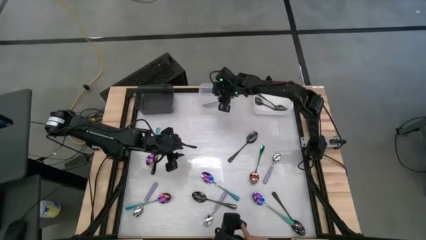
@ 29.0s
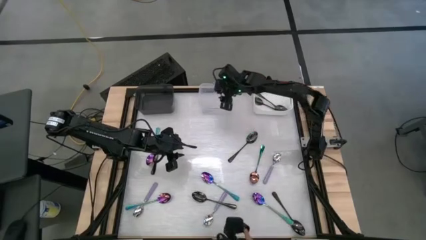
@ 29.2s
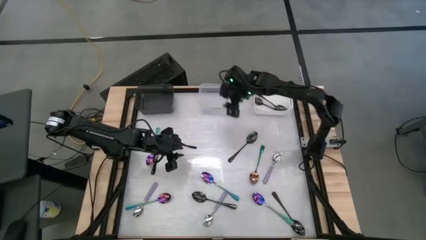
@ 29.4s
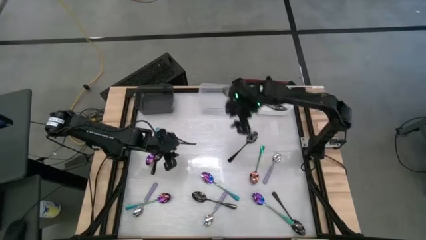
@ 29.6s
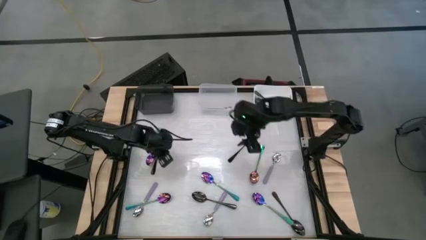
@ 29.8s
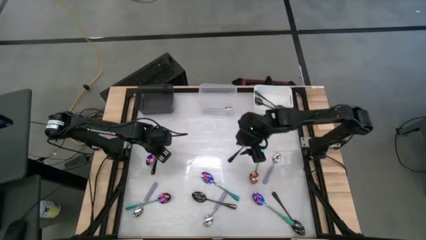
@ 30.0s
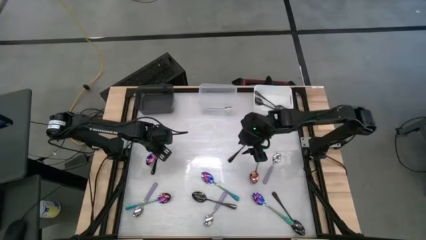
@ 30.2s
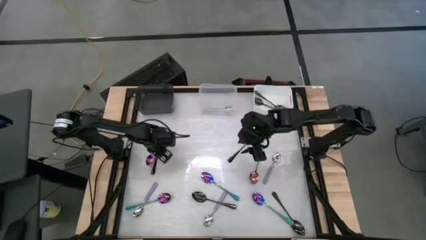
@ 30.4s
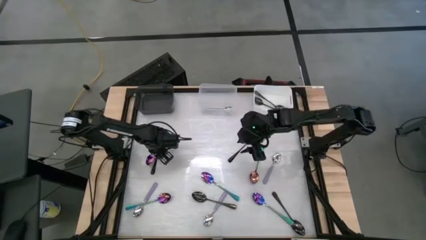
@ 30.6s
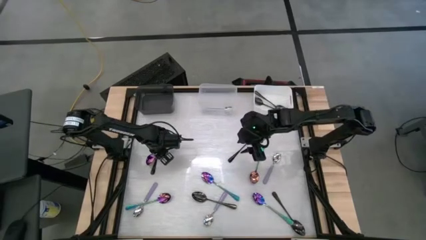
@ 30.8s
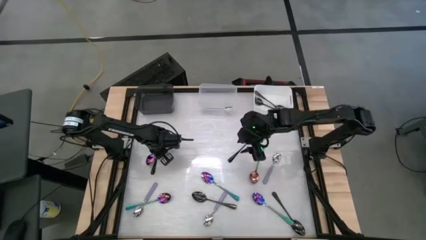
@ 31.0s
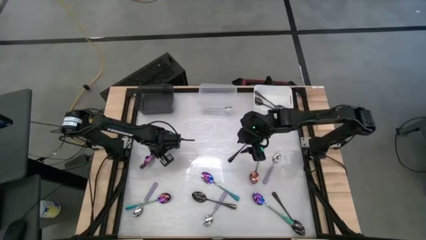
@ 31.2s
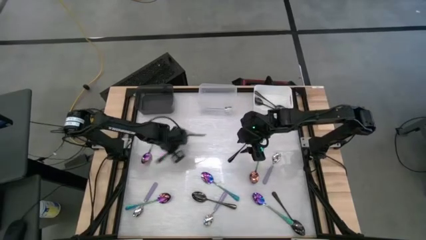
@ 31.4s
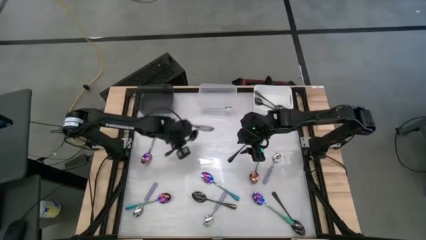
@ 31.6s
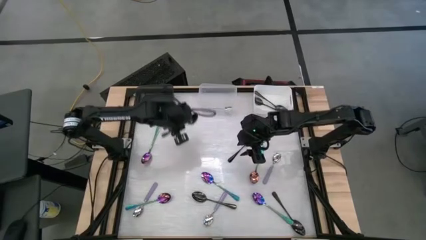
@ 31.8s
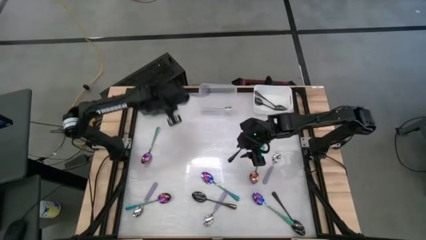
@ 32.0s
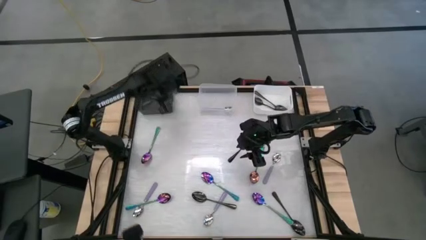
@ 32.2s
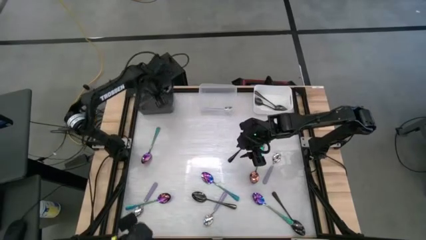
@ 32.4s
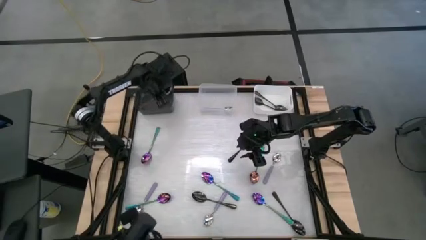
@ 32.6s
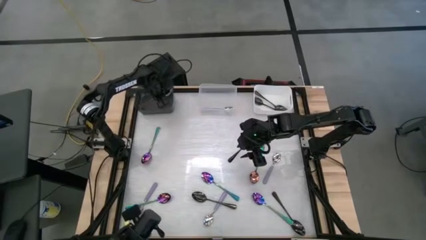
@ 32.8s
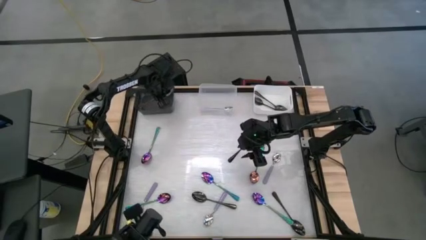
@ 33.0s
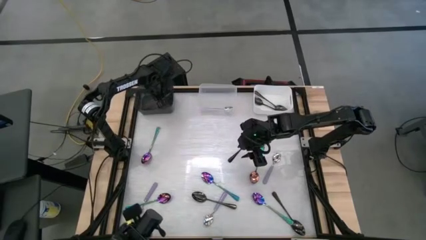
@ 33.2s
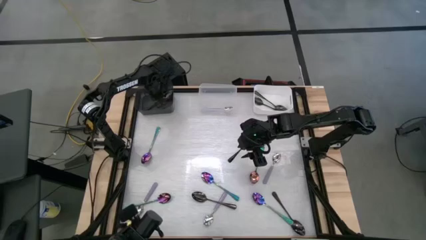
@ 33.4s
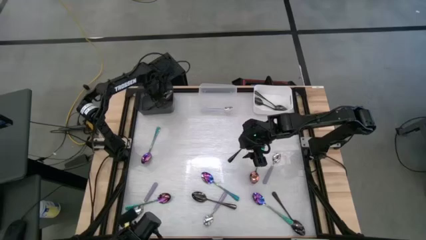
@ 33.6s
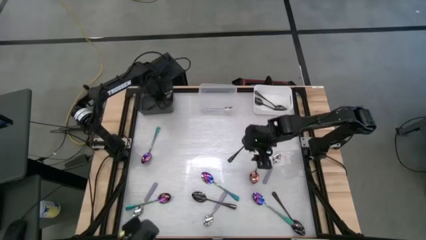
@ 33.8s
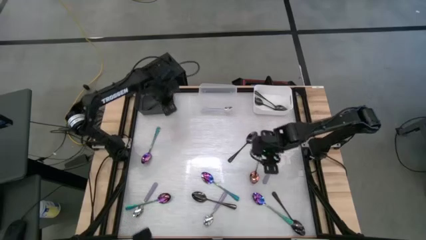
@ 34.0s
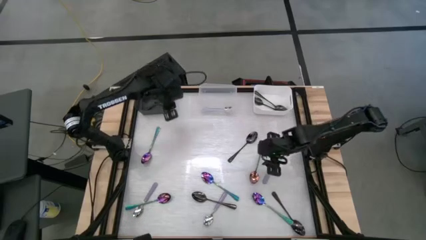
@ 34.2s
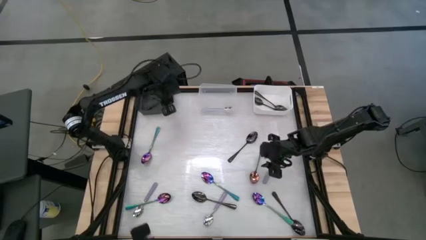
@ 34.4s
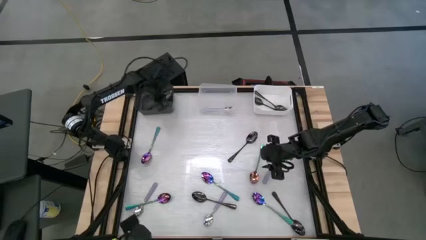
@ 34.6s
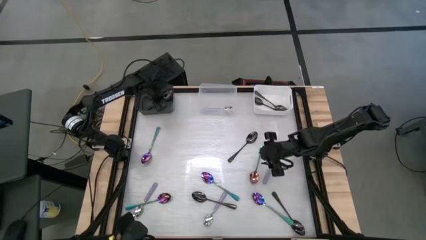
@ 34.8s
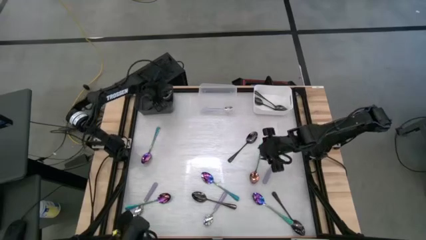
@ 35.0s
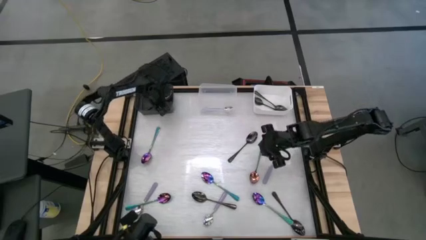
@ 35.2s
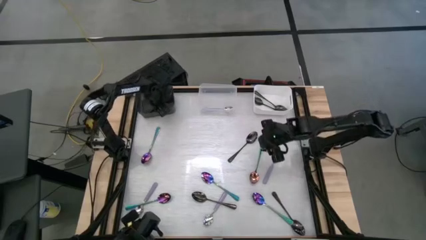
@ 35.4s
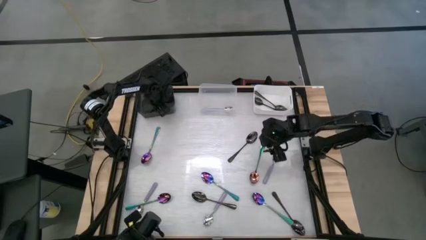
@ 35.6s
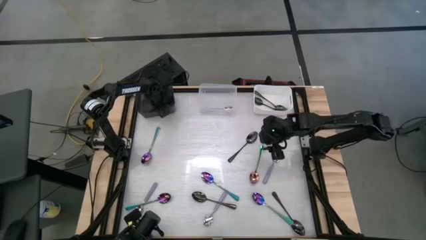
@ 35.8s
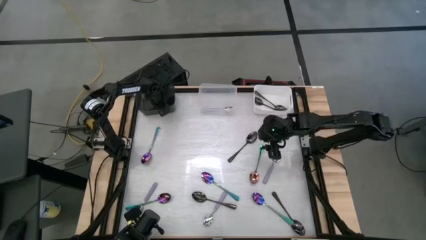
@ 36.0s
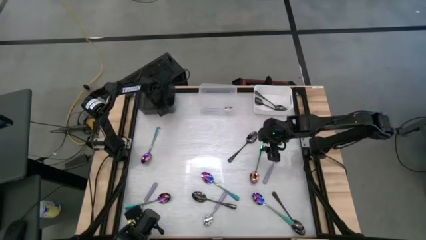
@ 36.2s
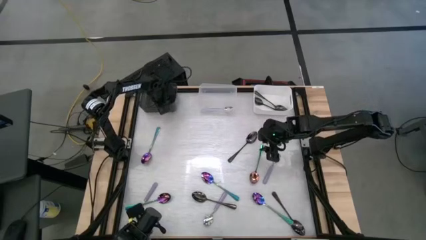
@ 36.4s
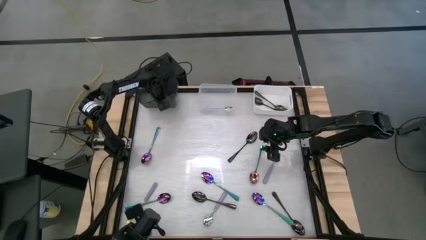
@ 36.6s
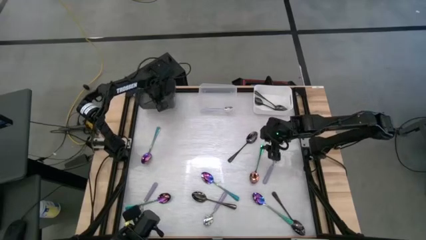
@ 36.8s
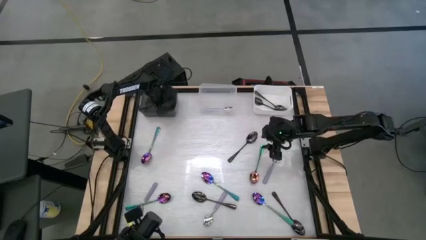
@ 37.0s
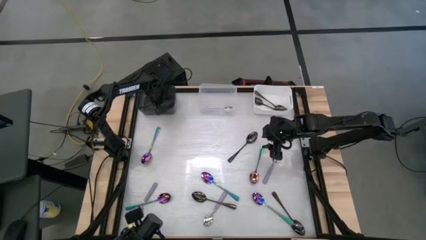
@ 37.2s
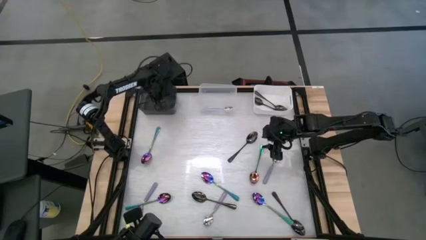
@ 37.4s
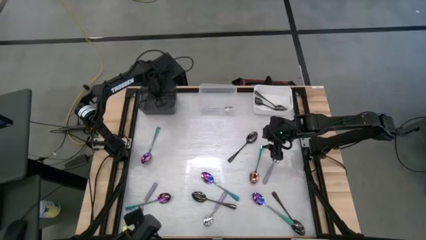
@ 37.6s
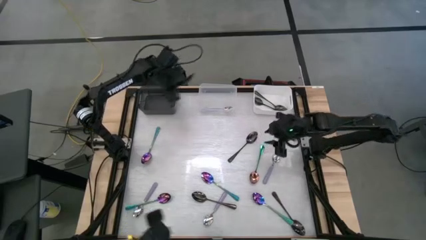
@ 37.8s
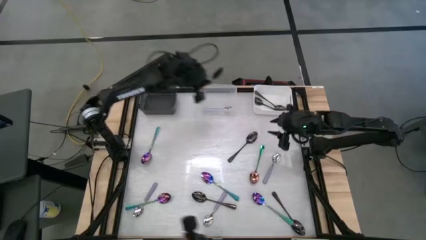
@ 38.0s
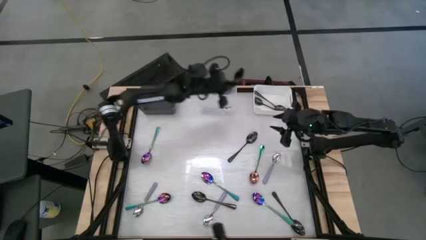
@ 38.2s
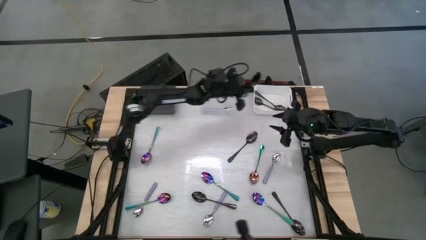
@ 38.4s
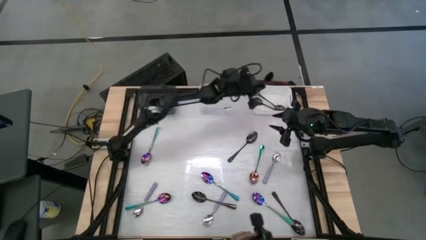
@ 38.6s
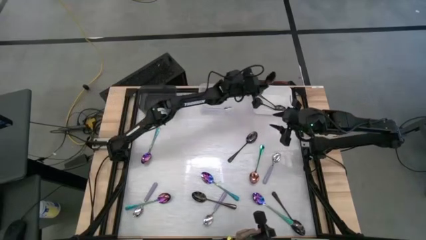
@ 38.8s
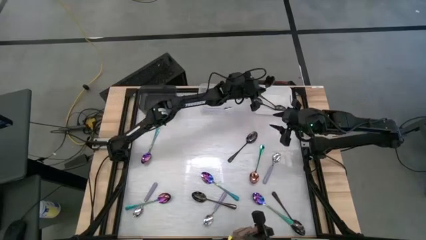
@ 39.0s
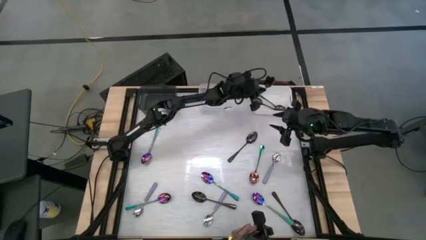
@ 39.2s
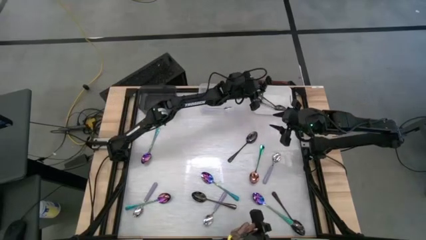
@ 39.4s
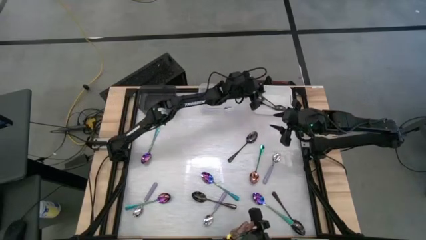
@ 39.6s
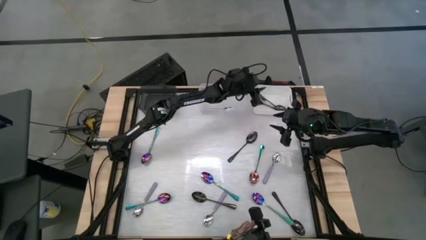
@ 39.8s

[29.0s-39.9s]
Task: Sort silverware by color (type)
Put the black spoon into the white bin

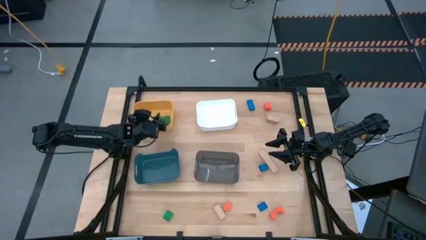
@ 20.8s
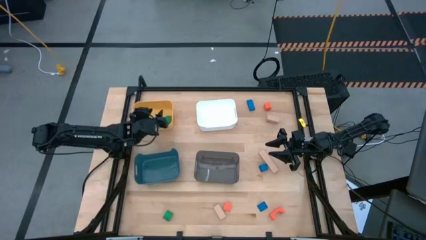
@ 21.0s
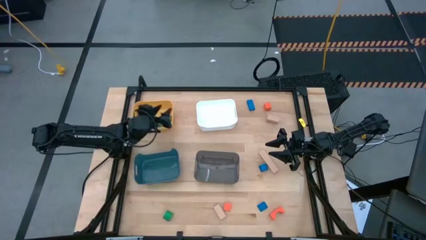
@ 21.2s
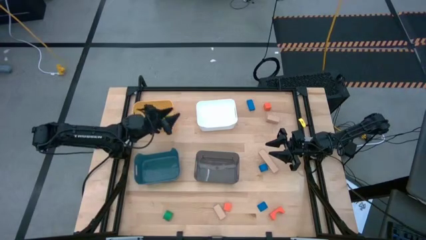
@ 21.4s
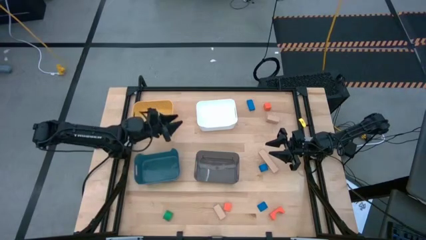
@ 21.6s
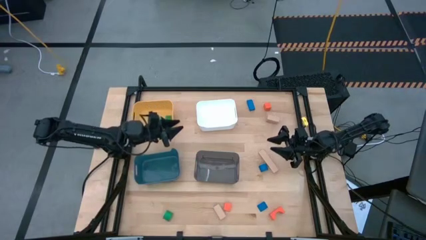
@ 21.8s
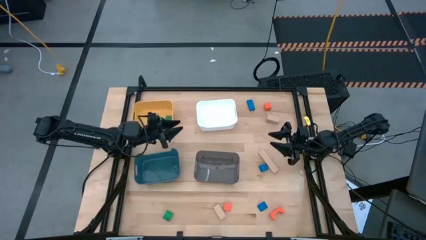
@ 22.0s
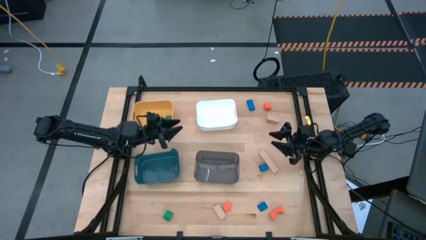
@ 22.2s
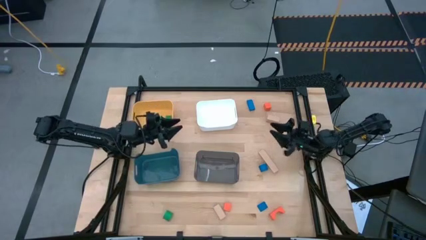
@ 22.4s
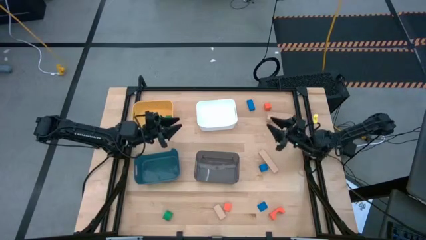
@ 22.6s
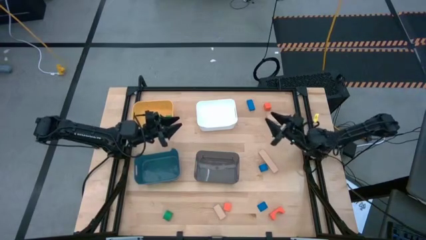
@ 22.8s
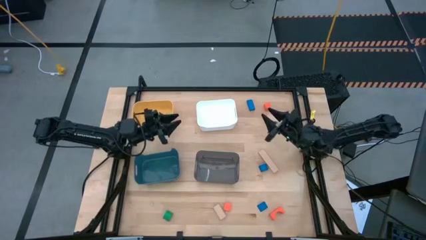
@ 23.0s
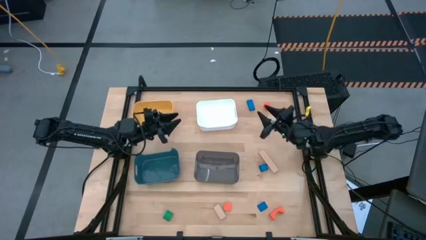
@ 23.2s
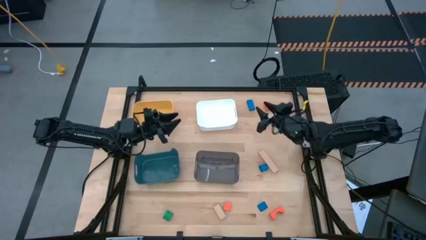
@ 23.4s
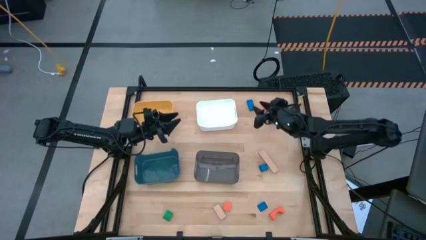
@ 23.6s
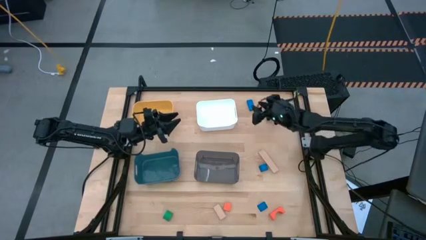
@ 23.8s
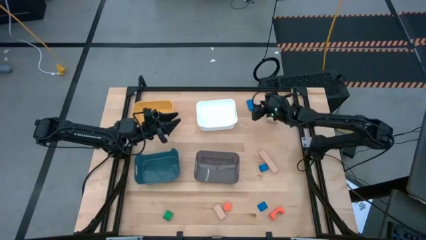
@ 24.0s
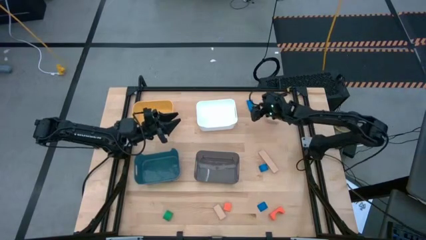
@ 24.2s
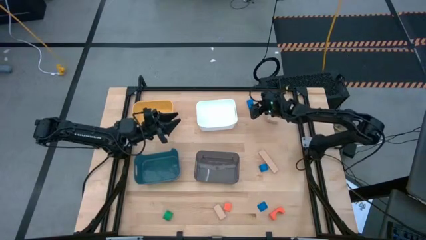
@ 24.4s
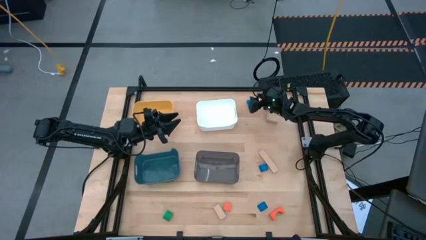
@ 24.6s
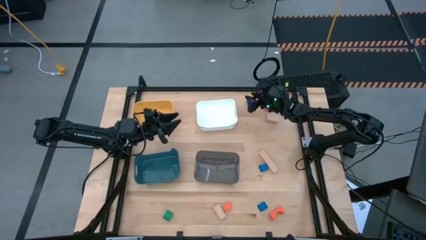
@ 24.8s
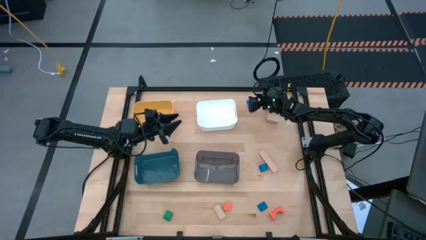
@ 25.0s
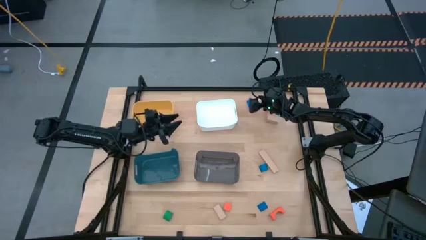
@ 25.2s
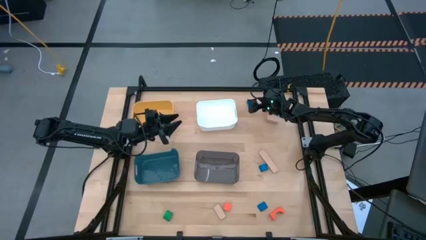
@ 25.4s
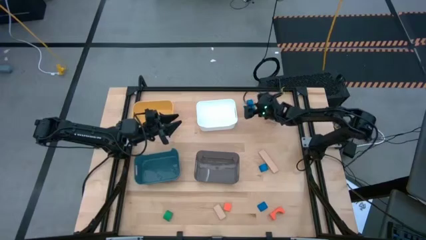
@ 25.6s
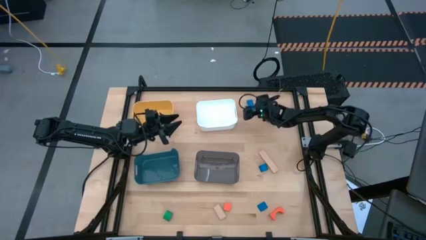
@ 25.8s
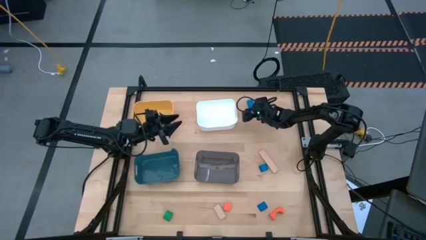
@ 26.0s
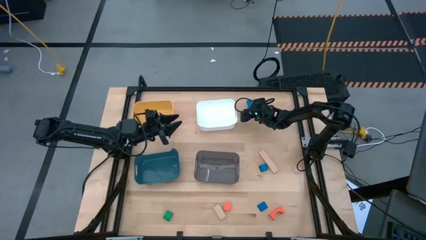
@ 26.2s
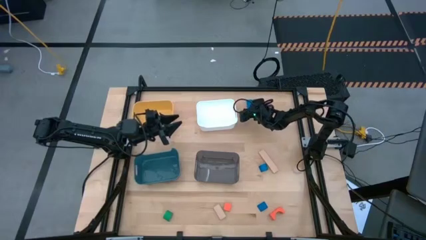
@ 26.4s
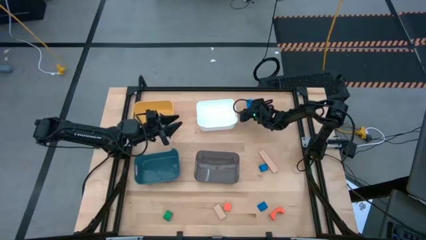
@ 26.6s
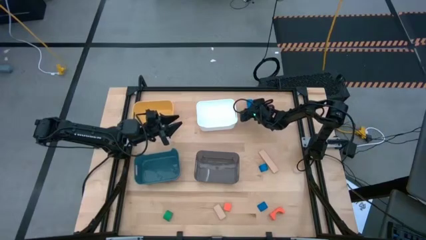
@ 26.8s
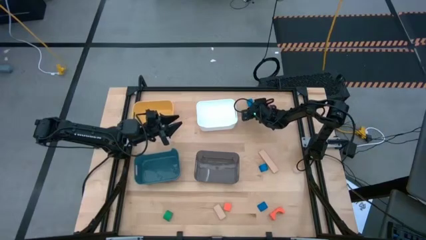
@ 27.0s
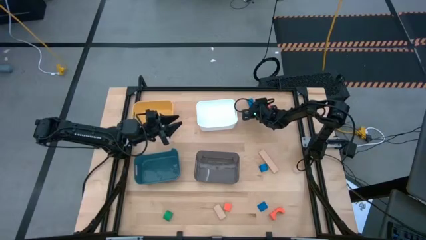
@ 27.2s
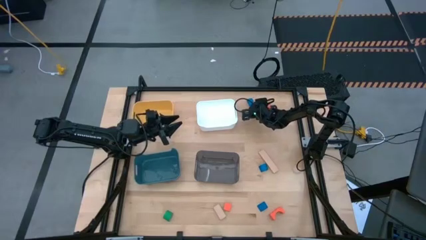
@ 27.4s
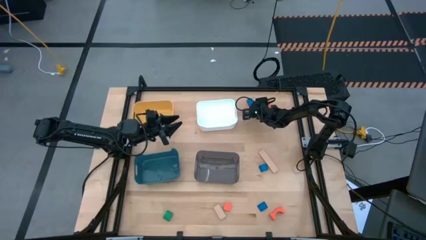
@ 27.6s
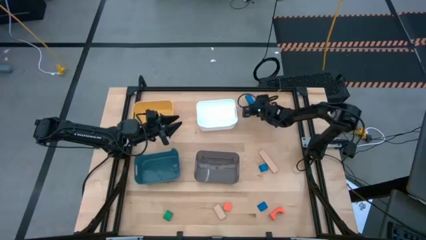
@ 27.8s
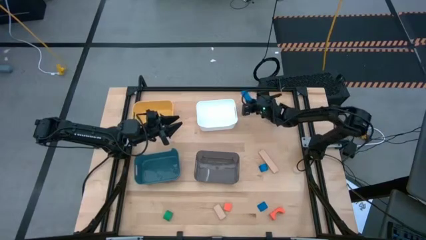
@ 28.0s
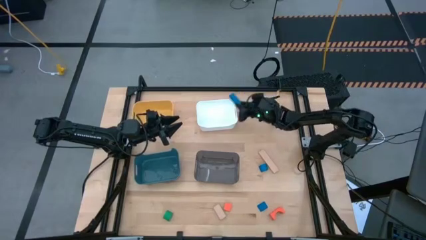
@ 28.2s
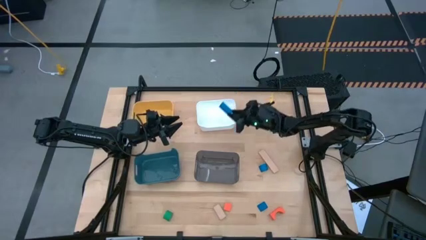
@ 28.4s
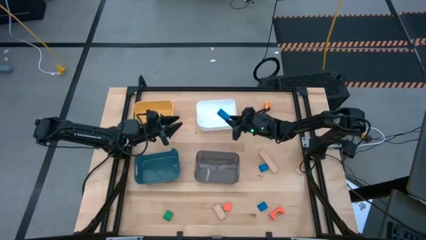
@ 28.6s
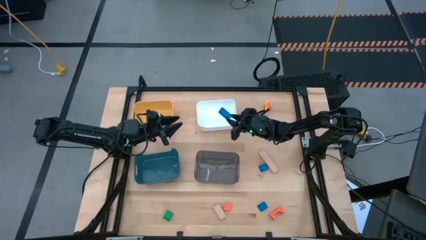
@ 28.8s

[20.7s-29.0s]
Task: Sort & place blocks by color
Put the top blue block into the white bin
